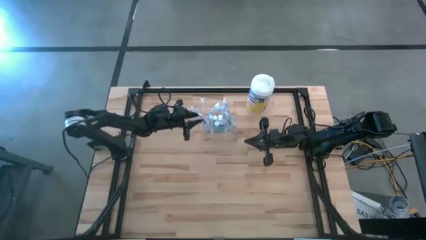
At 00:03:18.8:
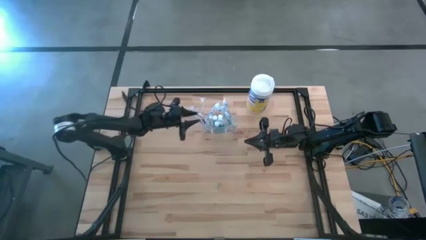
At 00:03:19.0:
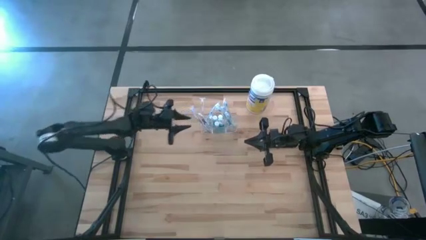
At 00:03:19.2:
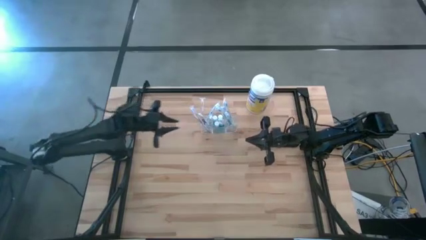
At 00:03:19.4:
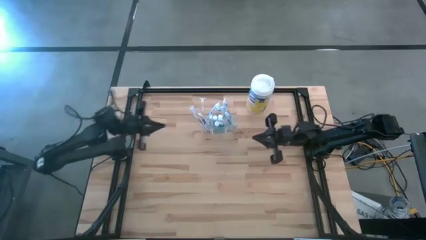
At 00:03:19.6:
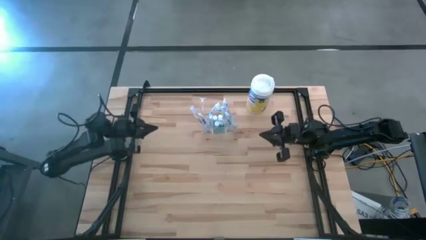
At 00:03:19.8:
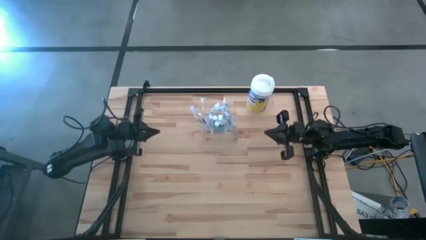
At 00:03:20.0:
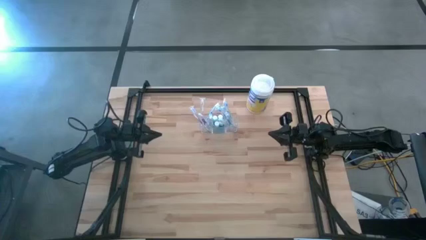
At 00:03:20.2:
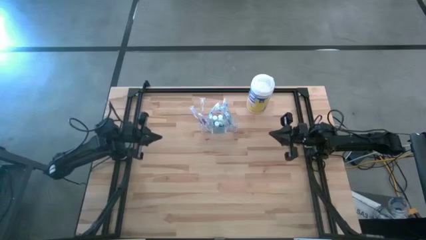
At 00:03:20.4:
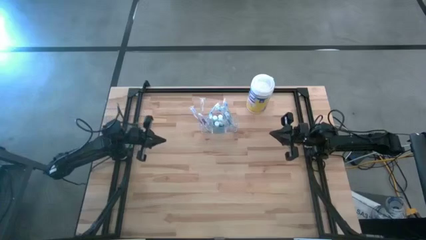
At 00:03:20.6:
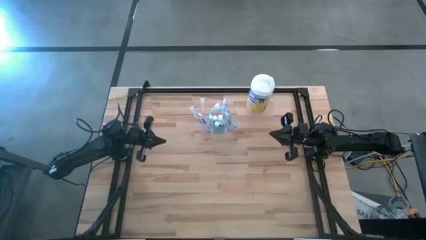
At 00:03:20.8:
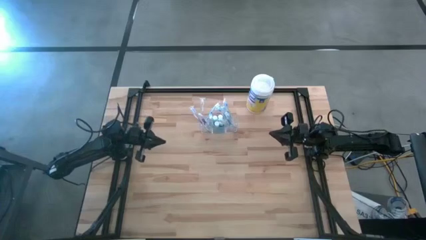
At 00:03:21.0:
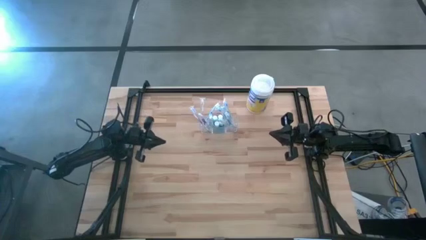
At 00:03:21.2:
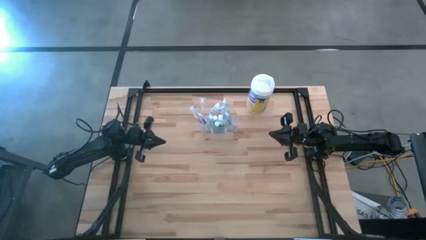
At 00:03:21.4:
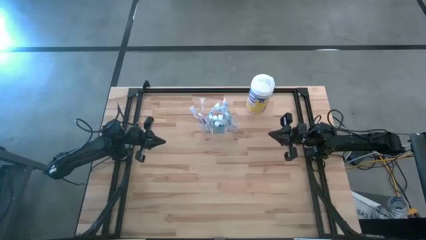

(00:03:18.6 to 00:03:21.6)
Task: Pick & Place toothbrushing station
Return to Home Position

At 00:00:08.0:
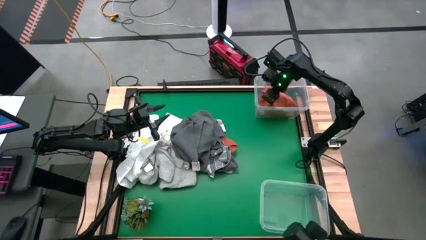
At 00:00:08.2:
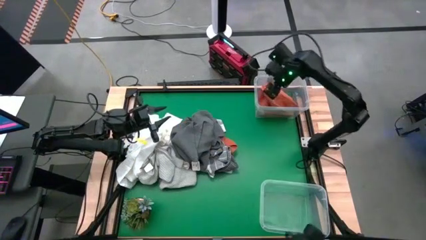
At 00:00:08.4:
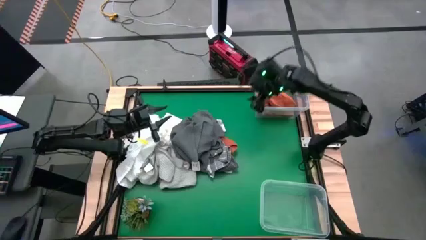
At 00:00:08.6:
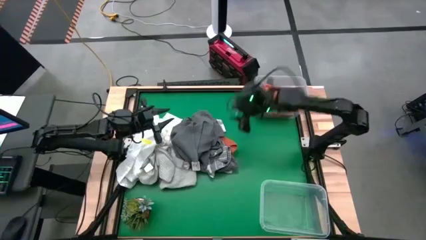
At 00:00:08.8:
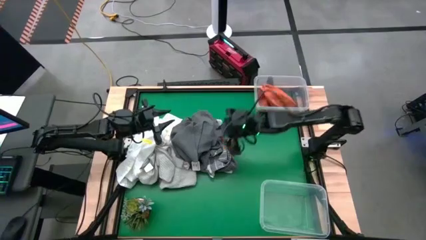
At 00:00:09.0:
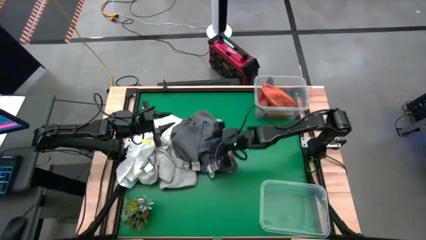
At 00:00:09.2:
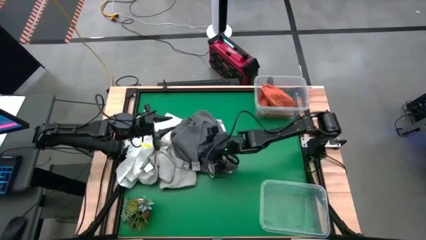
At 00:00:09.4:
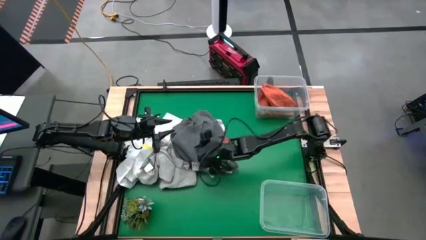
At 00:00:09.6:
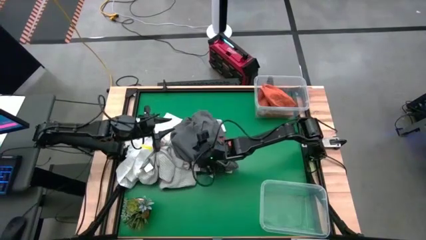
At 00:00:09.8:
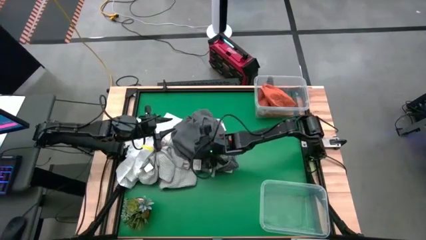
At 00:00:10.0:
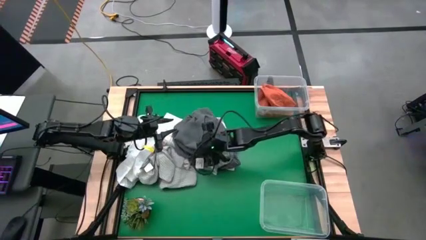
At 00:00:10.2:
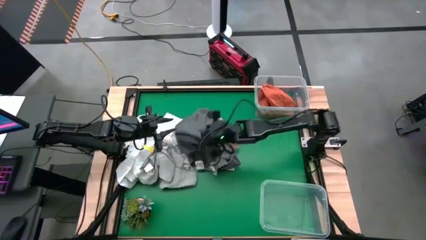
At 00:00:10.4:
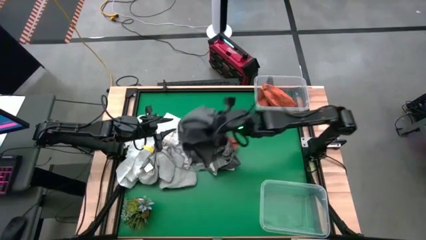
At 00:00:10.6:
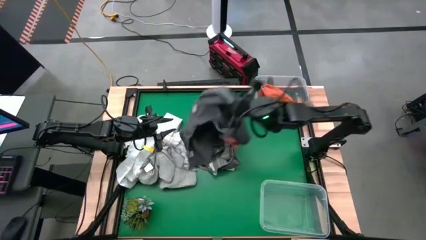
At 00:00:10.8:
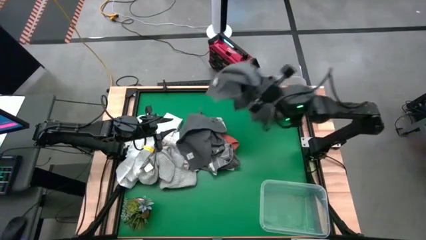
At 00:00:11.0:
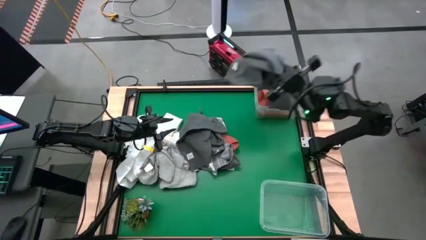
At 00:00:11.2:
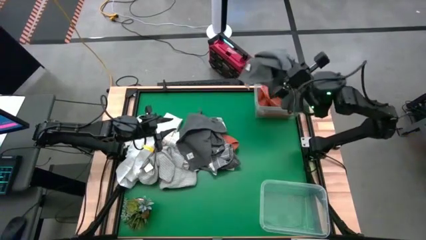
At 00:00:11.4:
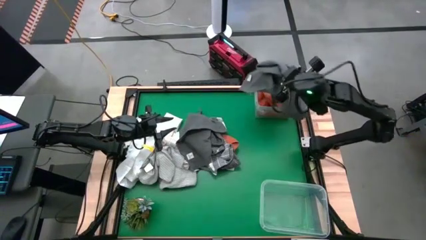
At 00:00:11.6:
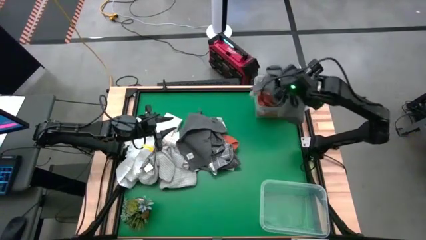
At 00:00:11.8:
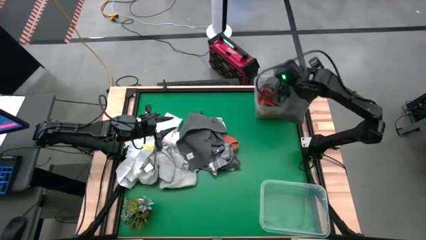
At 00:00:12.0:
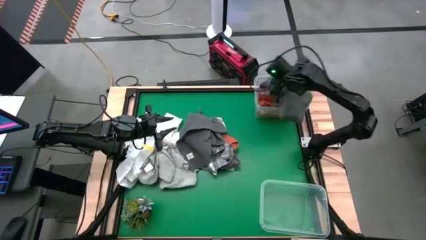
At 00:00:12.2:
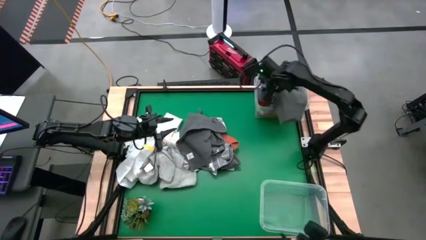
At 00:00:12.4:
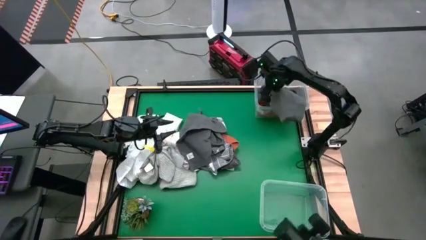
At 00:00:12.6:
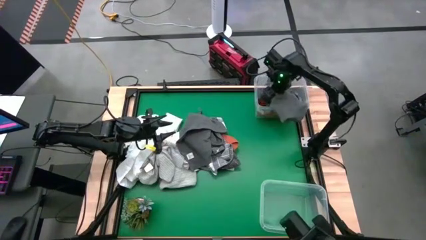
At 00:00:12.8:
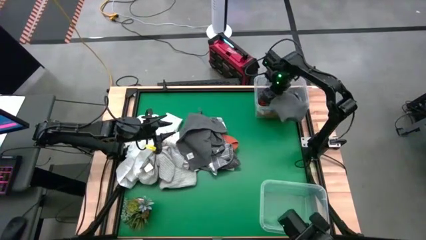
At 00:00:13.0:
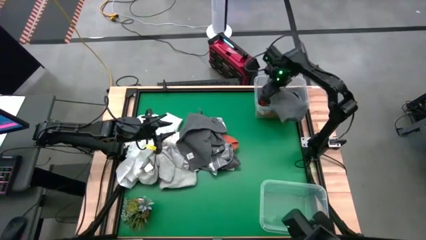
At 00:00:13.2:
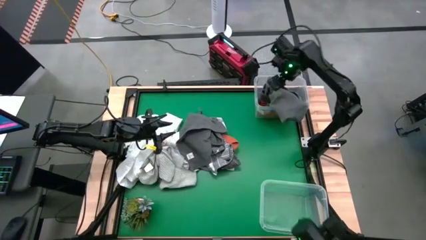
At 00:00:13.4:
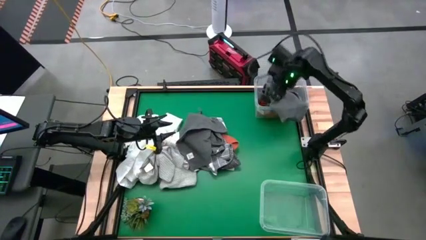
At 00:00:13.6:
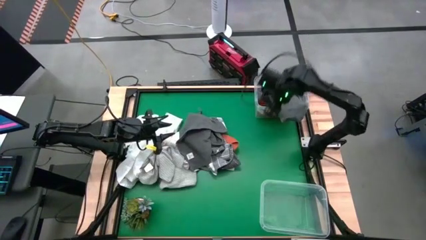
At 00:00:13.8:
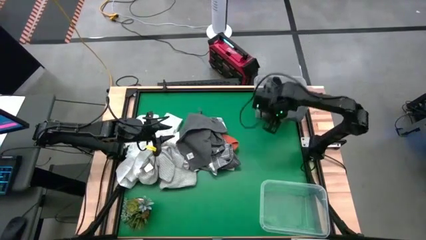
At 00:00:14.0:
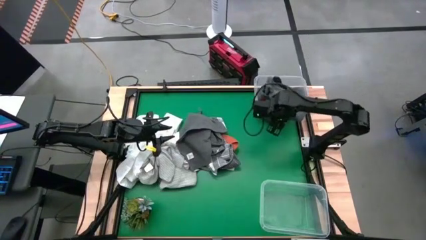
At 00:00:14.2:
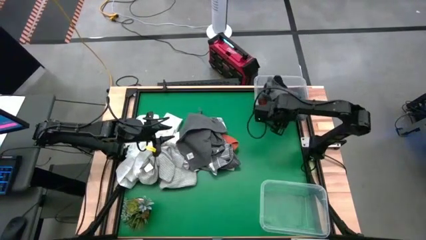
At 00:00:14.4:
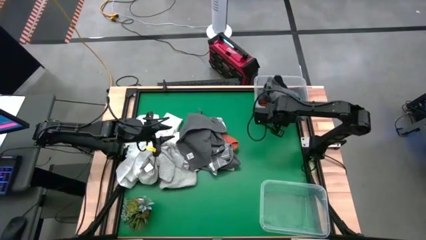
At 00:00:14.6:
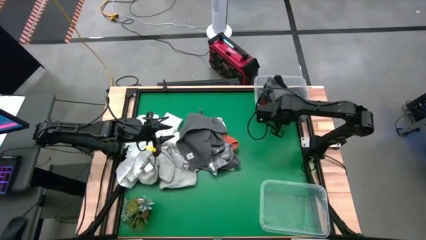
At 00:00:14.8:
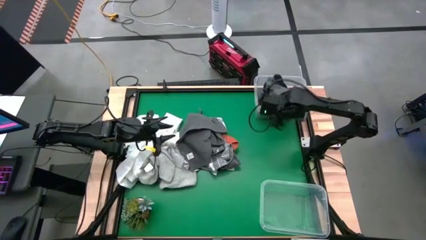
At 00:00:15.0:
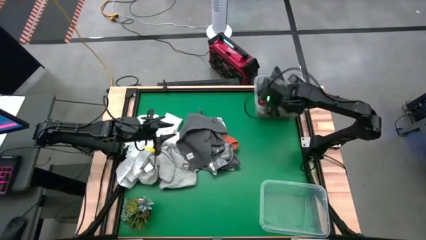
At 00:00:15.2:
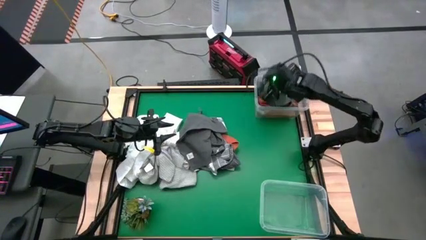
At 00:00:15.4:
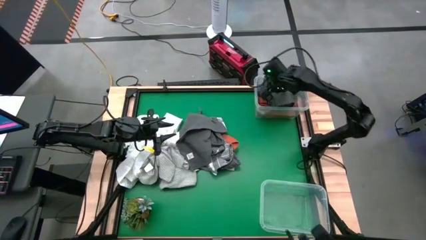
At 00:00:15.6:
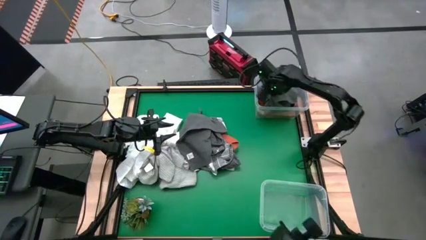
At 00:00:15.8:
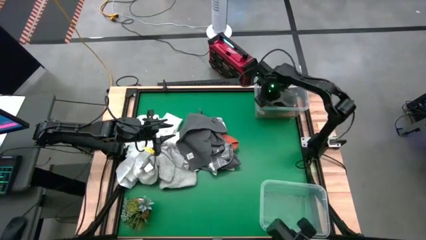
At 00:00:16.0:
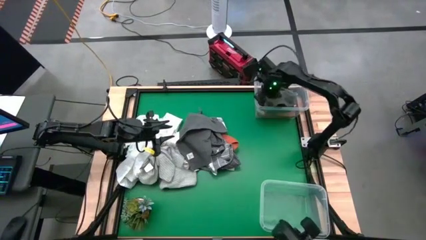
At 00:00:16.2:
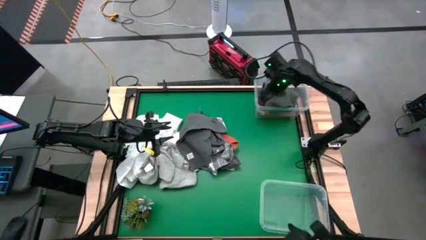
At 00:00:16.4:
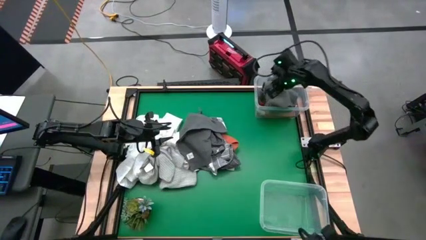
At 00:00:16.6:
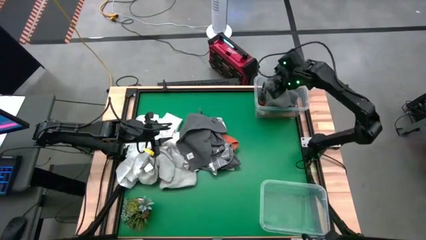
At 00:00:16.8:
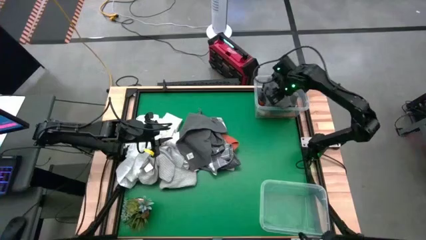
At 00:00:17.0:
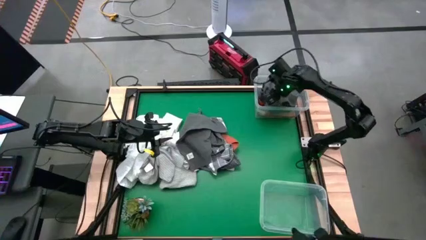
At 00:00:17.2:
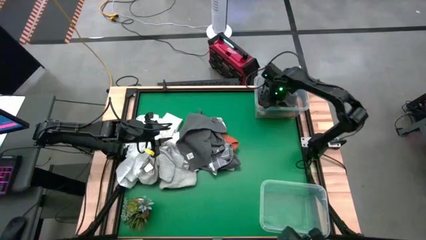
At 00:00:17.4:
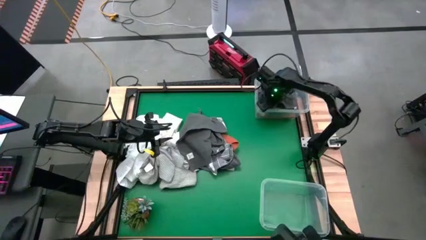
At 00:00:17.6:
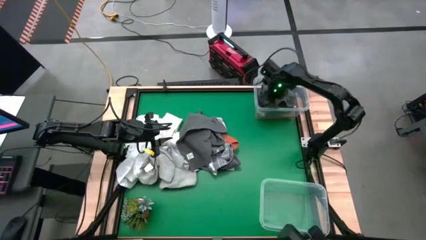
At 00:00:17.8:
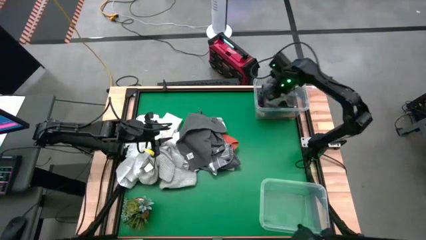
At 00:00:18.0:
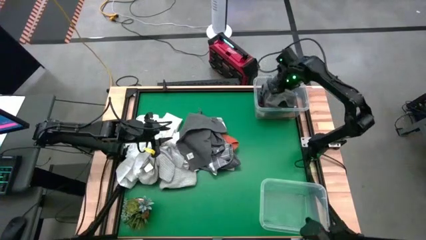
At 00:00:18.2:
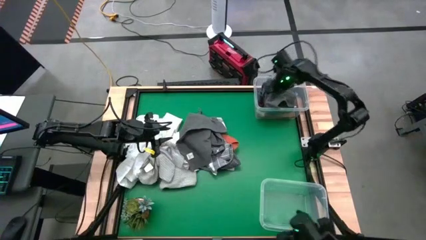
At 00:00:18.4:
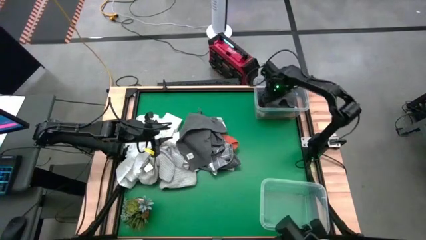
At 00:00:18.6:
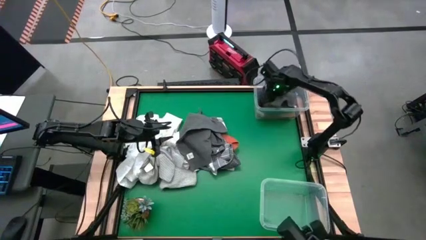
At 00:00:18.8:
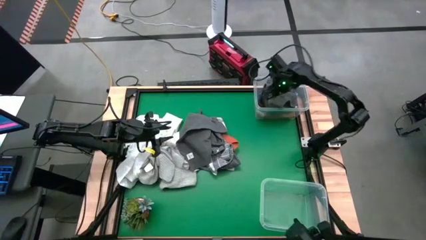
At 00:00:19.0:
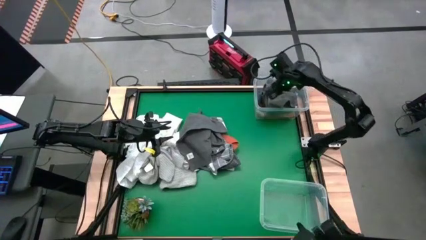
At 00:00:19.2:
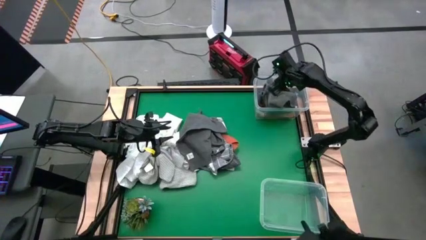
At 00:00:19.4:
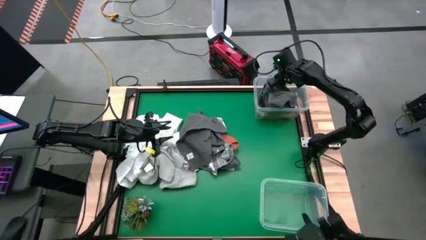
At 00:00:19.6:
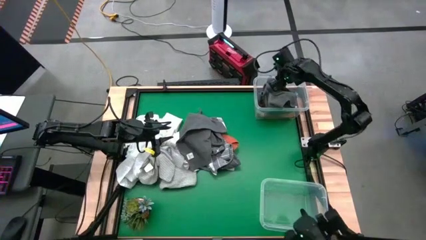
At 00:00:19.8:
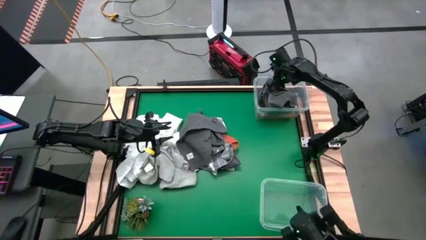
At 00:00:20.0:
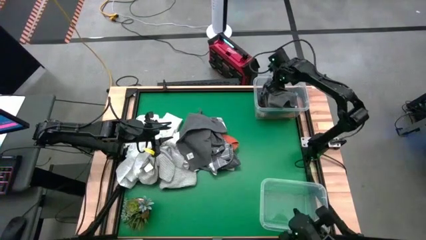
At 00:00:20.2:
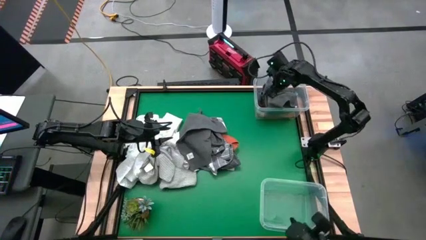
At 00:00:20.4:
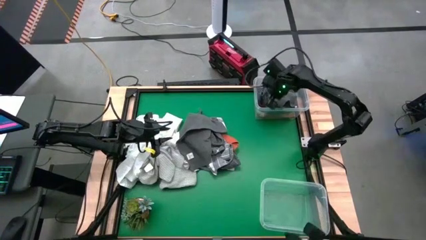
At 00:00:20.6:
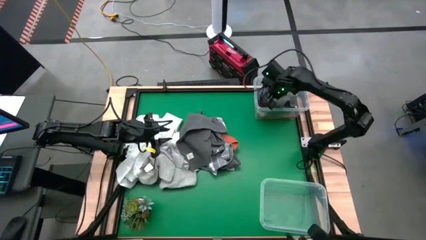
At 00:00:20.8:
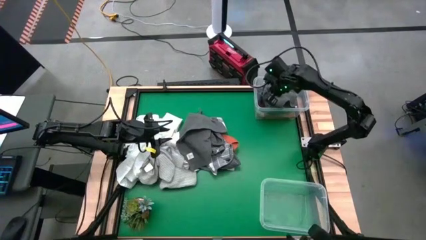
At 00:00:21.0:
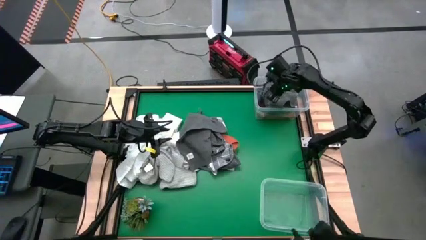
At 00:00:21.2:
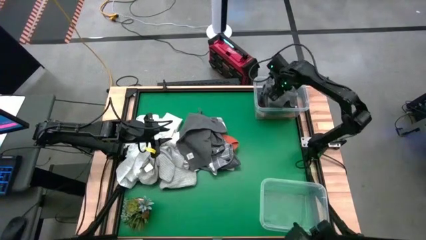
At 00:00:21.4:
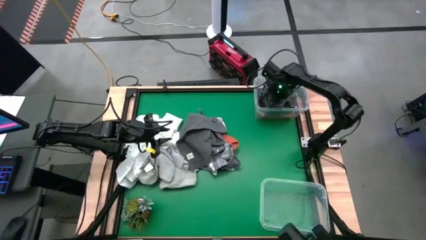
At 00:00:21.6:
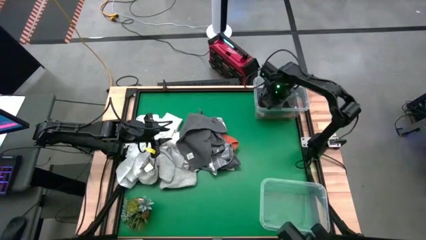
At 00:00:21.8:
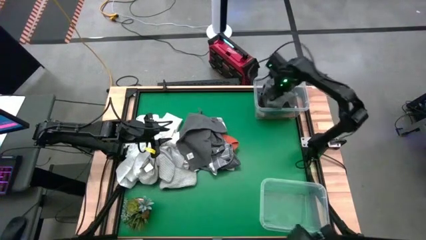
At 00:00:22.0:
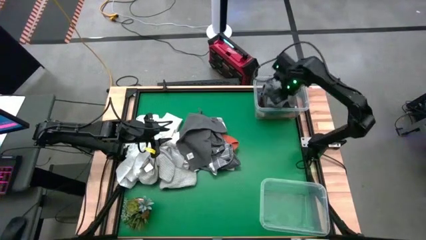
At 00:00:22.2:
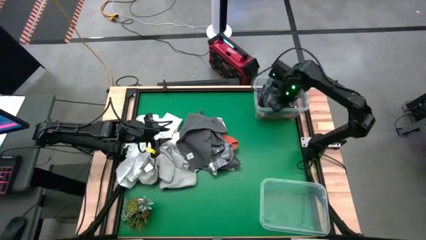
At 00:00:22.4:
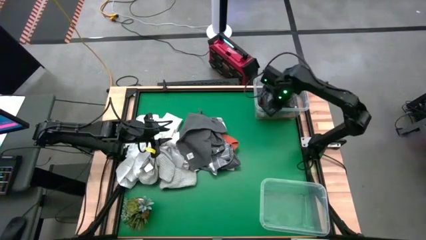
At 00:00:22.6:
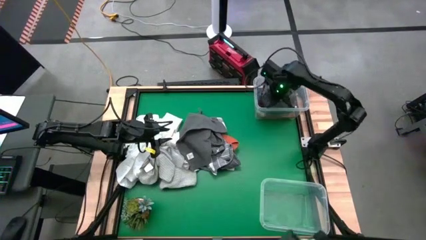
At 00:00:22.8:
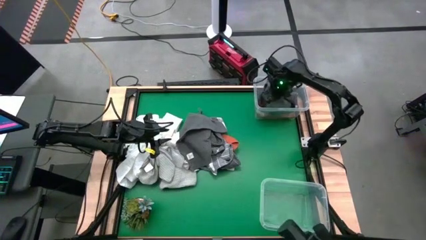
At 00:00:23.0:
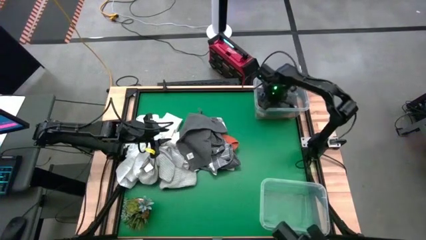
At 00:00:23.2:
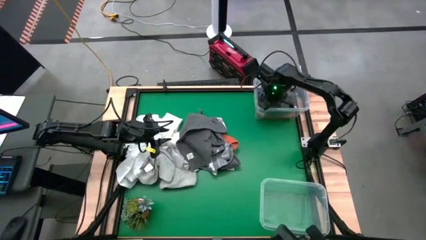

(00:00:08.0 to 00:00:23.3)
Task: Sort towels by color in basket
Put the gray towel into the top transparent bin
